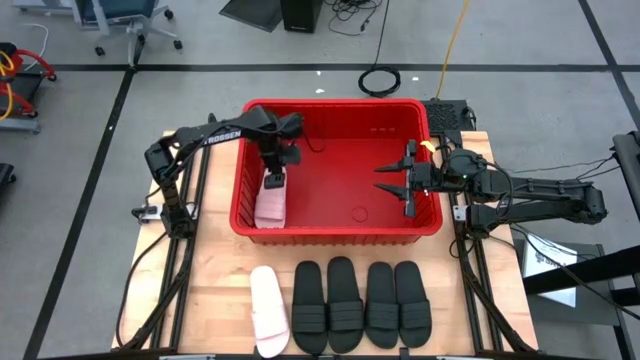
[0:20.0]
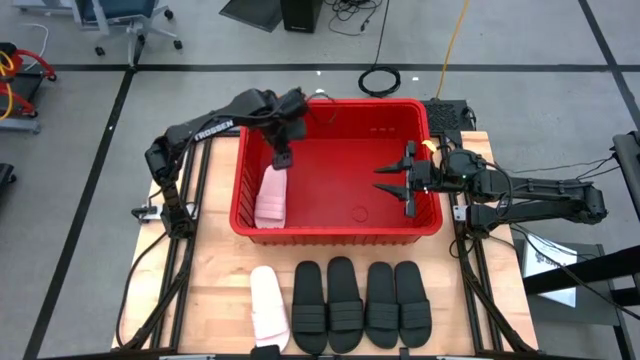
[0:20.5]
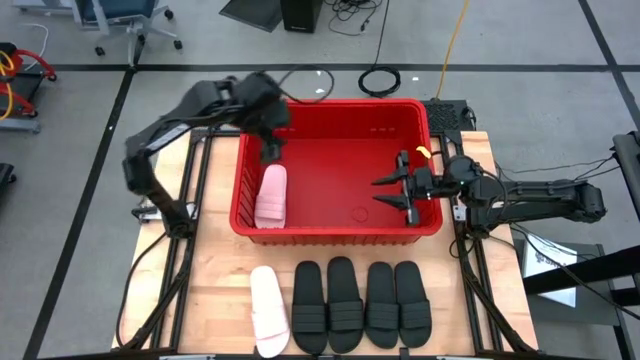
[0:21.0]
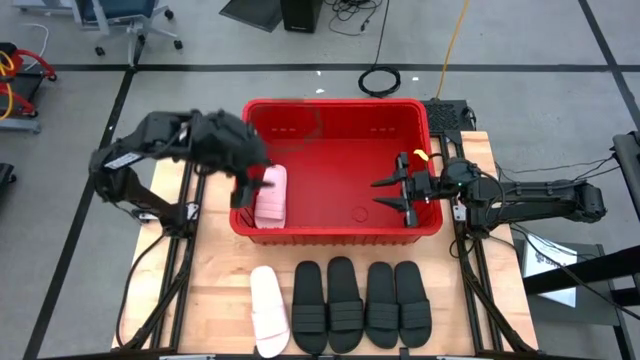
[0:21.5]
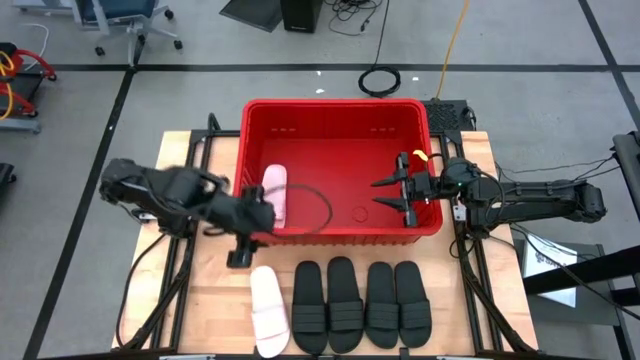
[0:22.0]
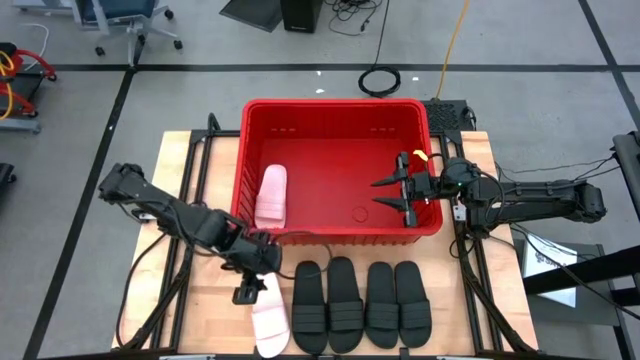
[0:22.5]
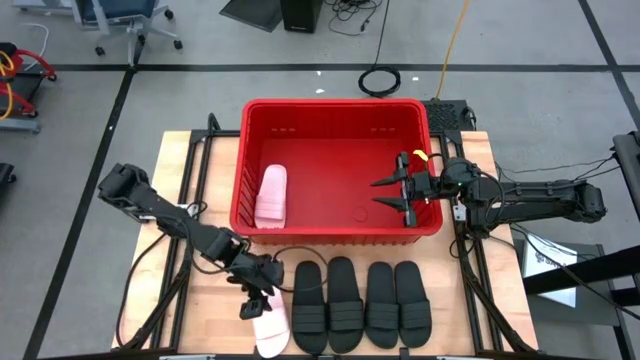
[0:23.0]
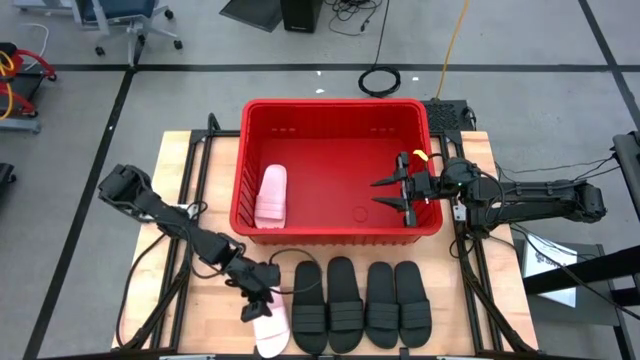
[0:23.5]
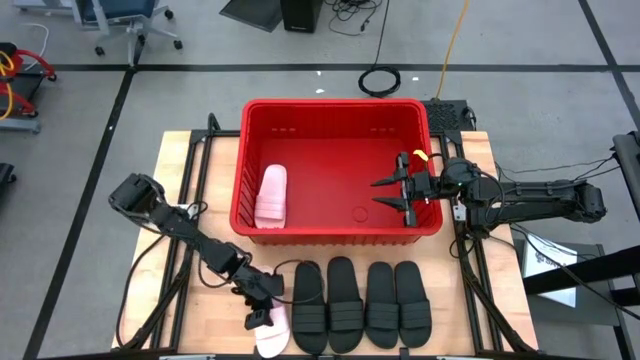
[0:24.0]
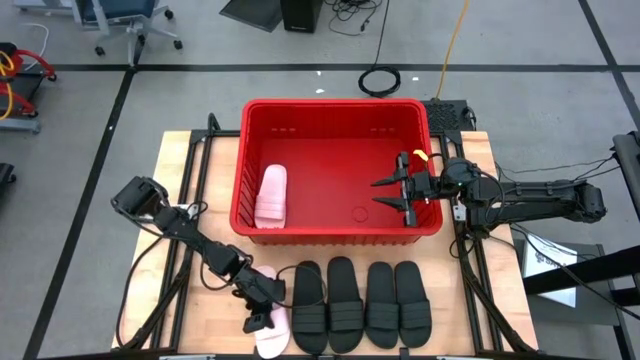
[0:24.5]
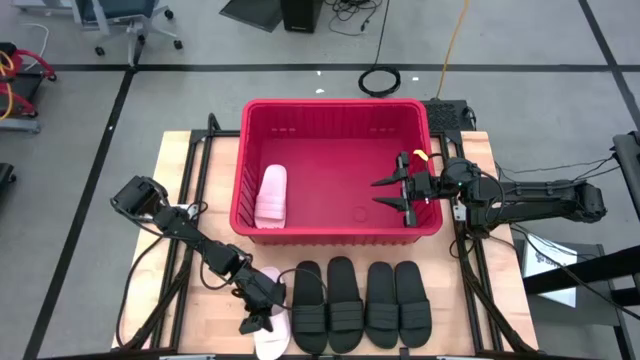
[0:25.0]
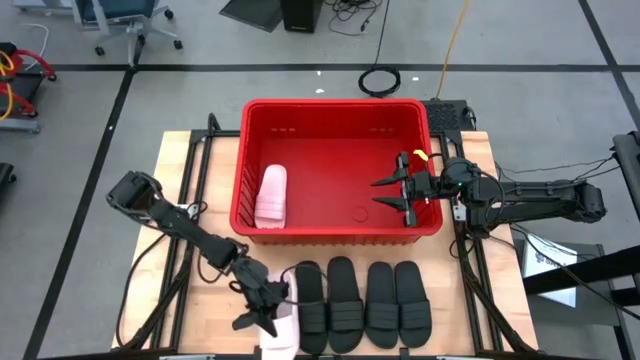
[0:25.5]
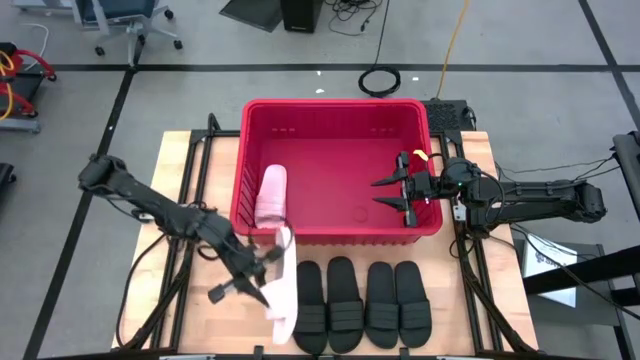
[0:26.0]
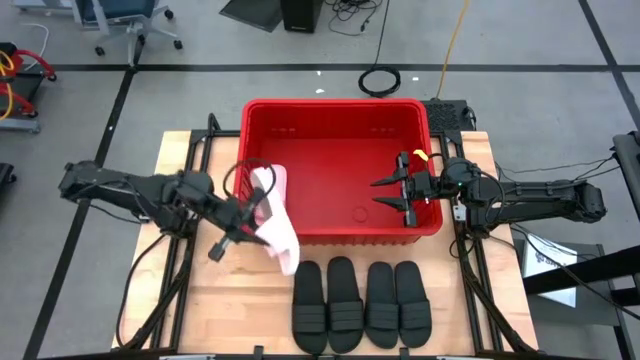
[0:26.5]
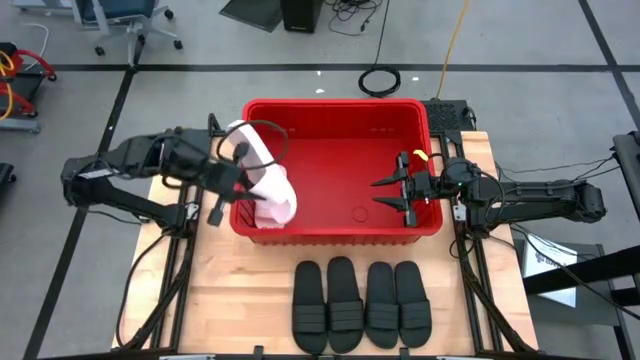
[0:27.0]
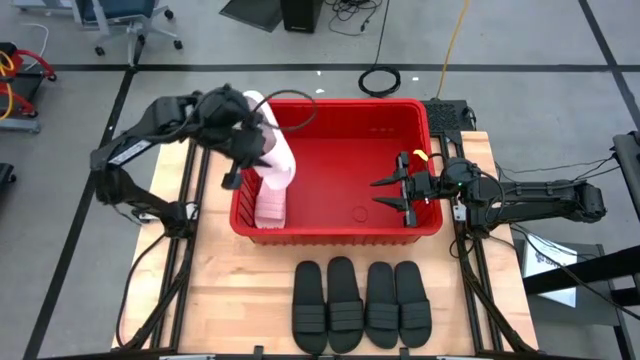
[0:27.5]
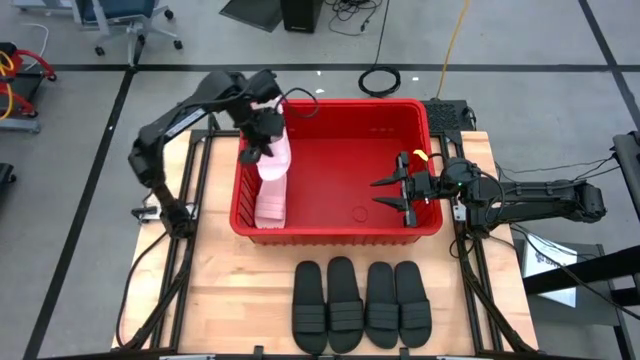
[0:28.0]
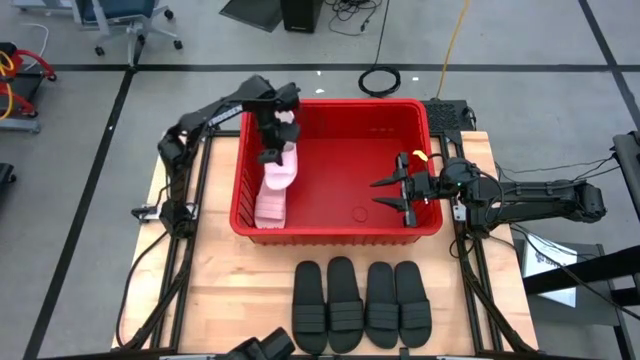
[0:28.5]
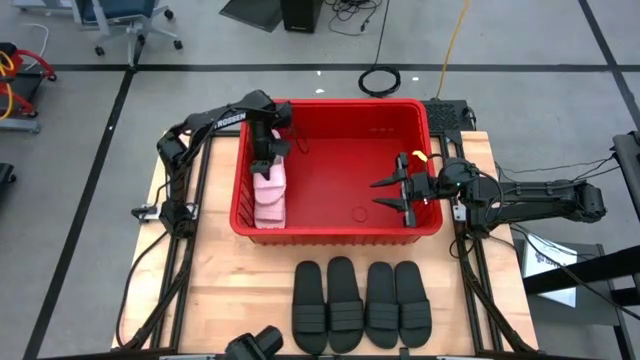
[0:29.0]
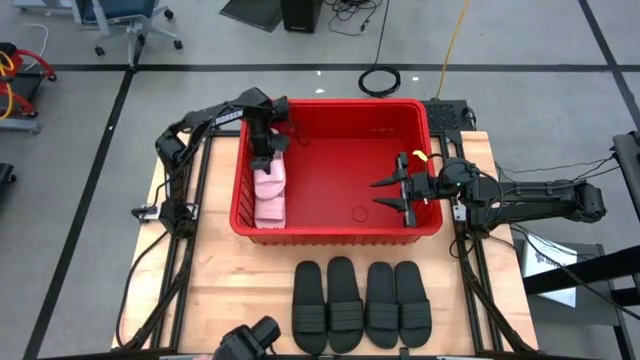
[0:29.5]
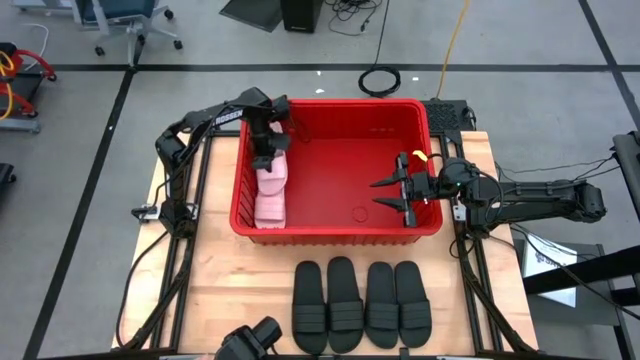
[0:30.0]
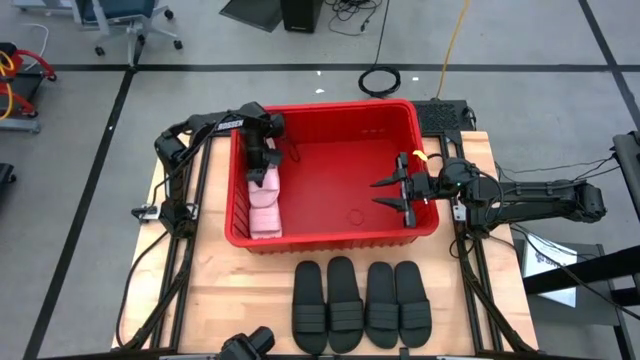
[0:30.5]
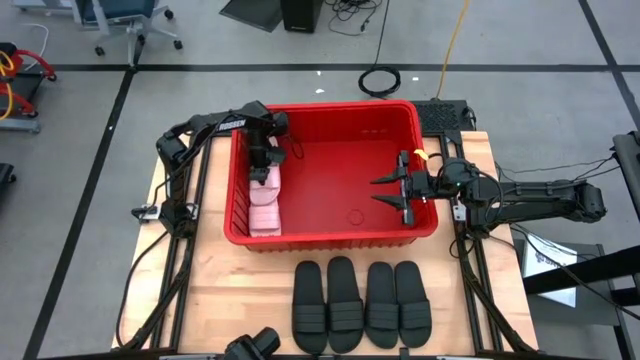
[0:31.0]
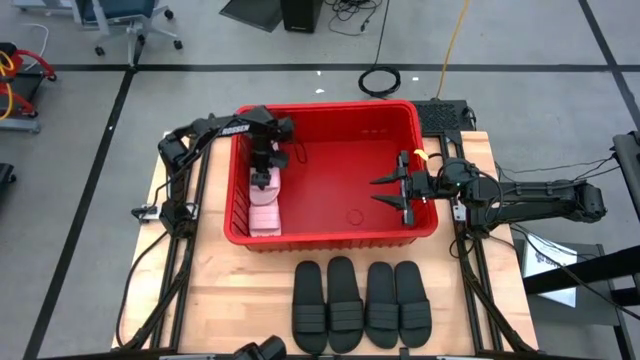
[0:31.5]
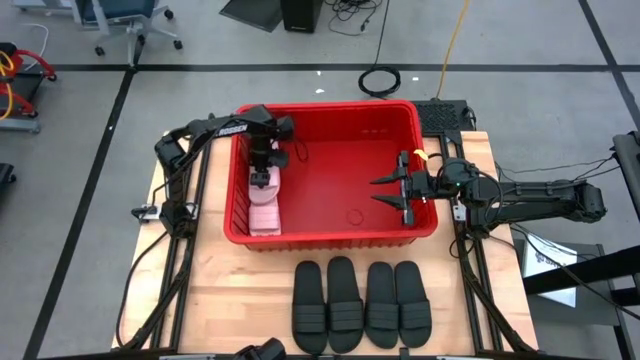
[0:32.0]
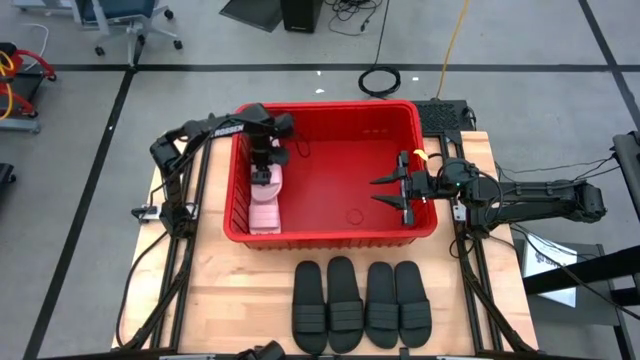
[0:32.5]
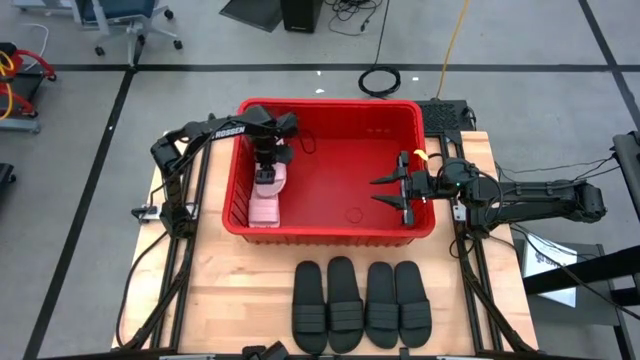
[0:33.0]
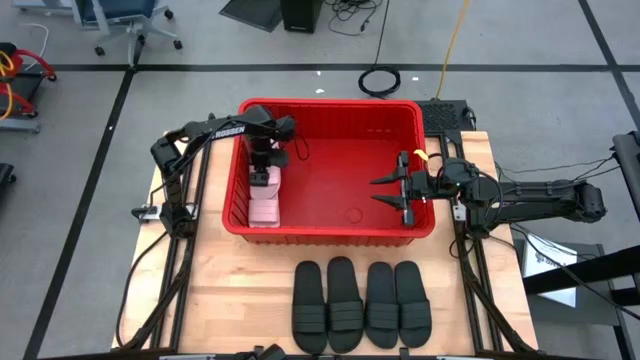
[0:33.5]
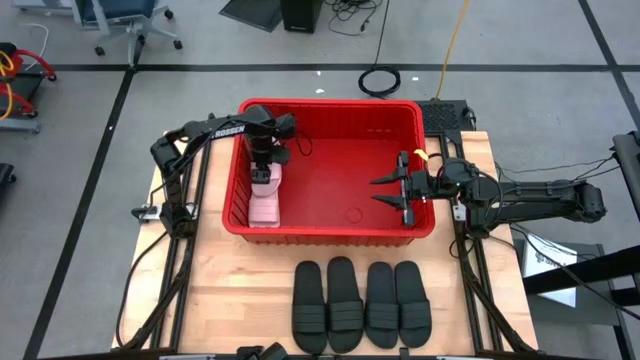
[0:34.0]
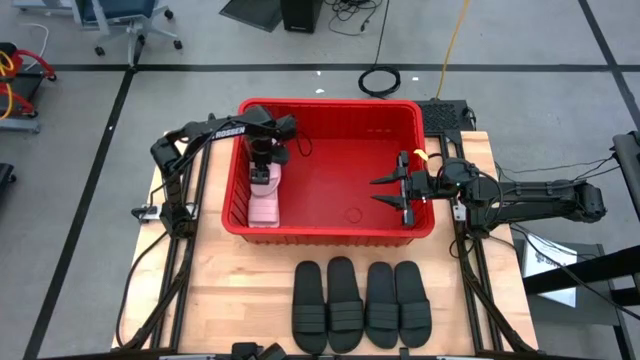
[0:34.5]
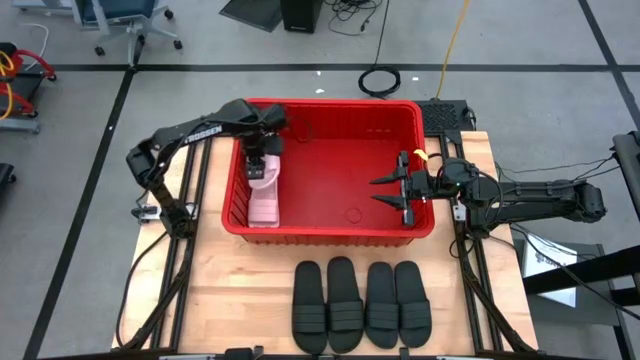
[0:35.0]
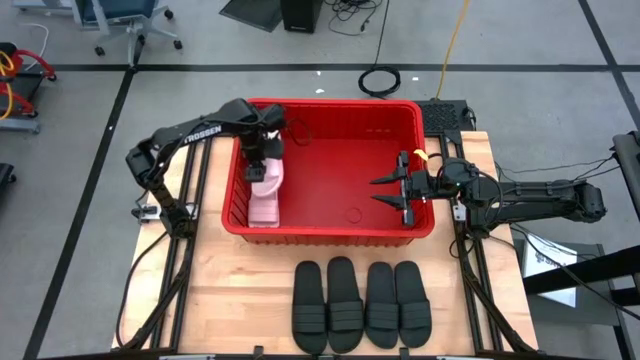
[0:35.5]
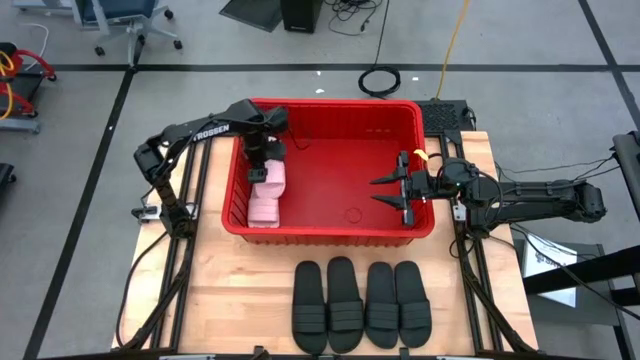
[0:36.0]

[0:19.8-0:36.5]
Task: Pick and place slides into bin
Put the pink slide into the red bin

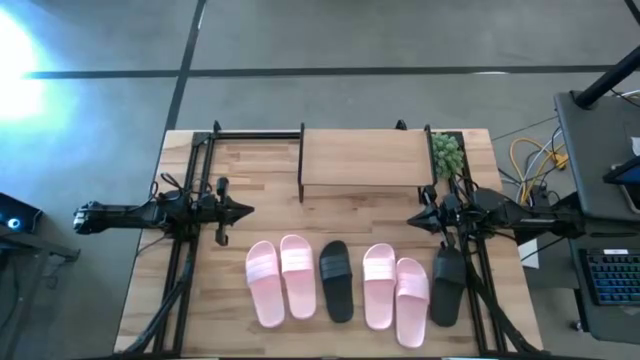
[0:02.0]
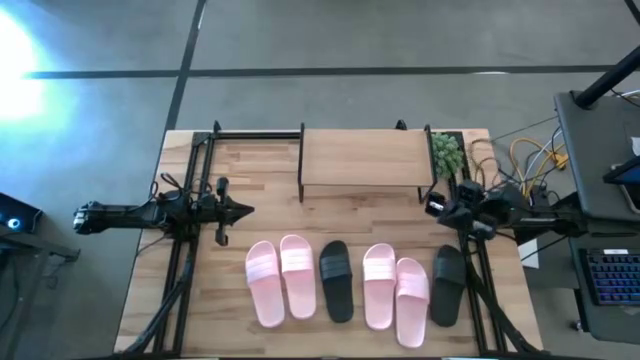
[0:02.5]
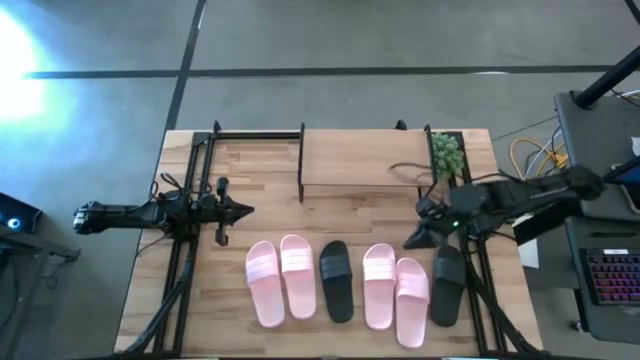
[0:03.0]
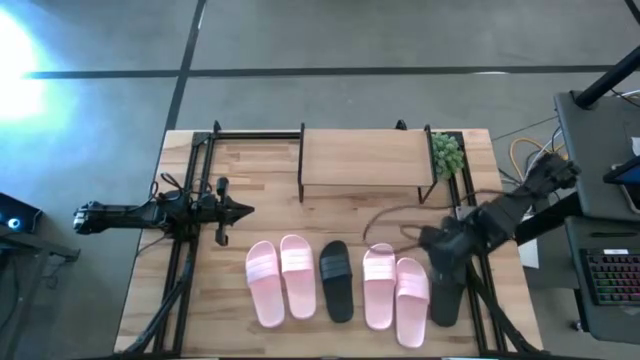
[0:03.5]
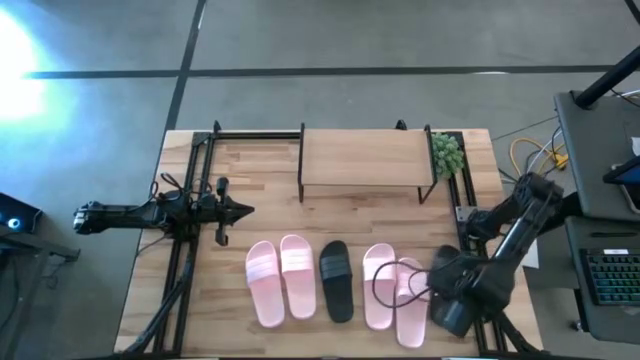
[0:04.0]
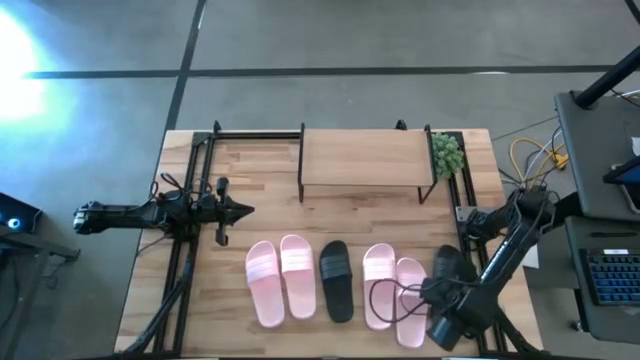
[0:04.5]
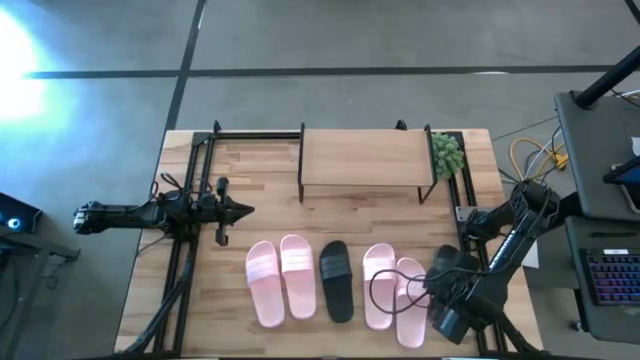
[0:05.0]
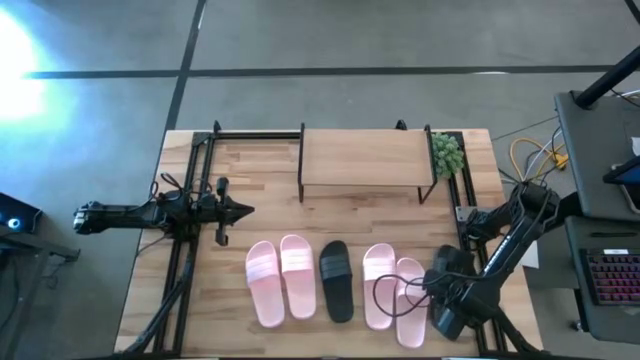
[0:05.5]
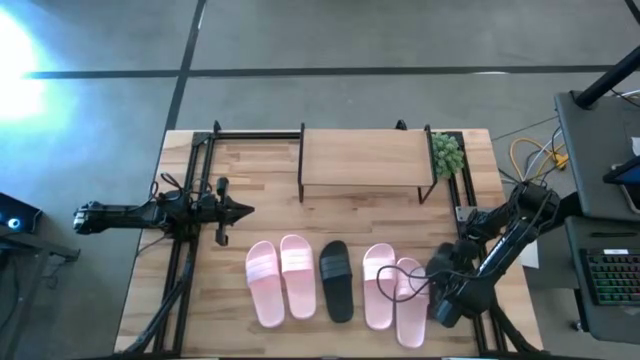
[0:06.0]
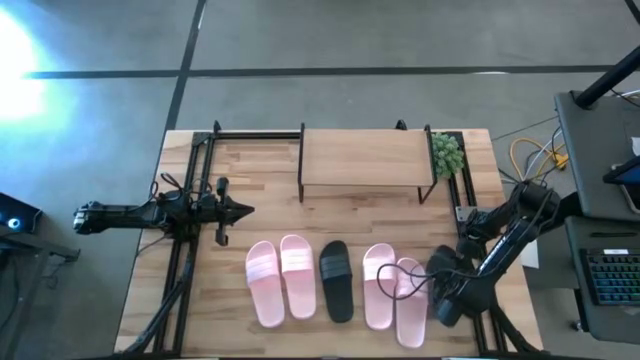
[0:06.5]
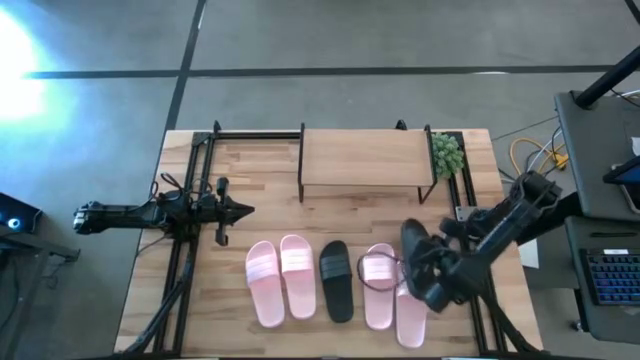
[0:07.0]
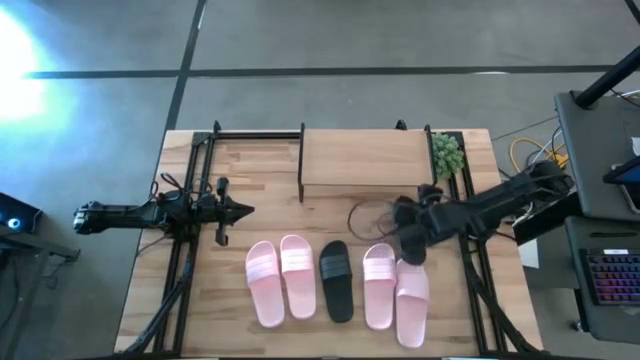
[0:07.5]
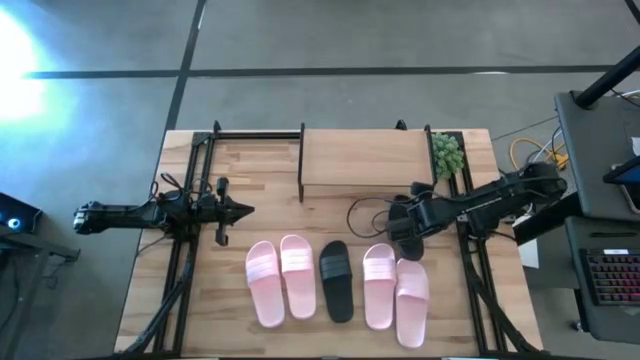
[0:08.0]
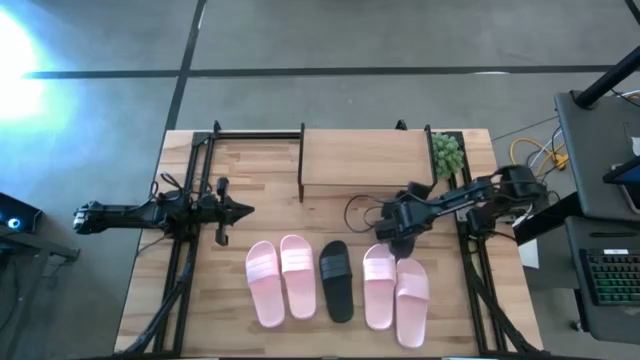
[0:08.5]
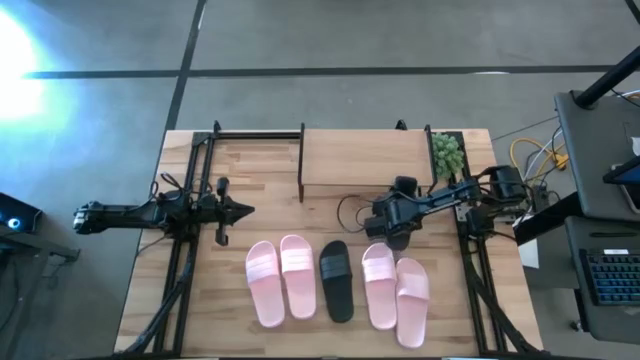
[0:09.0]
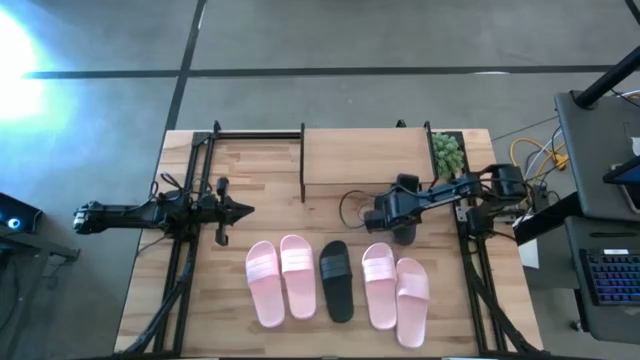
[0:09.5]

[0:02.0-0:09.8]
Task: Pick and place slides into the shelf
Put the black slipper under the shelf
